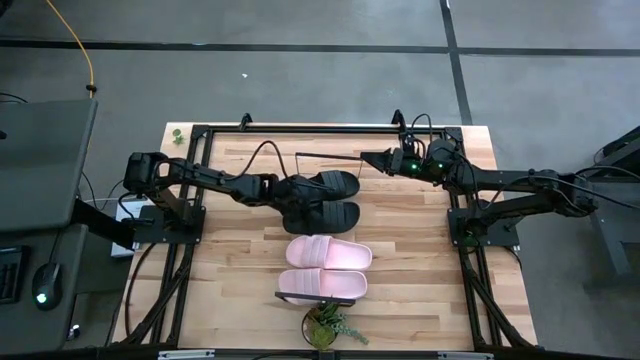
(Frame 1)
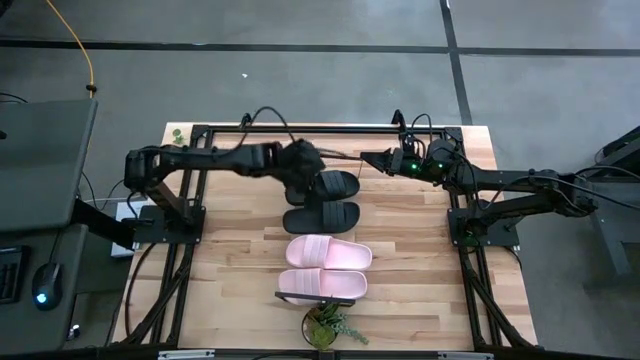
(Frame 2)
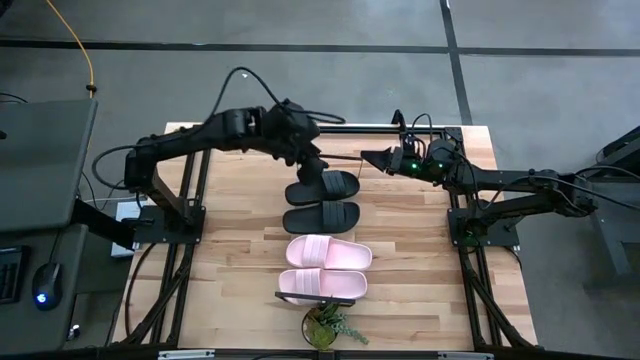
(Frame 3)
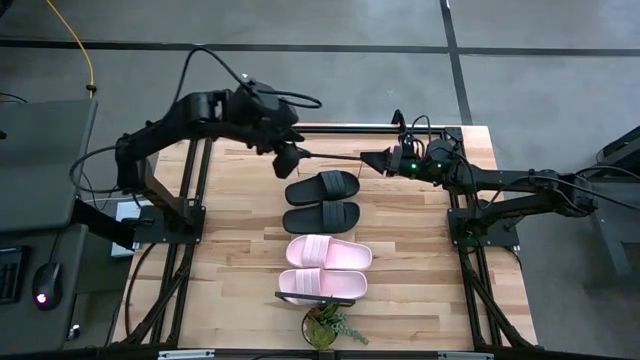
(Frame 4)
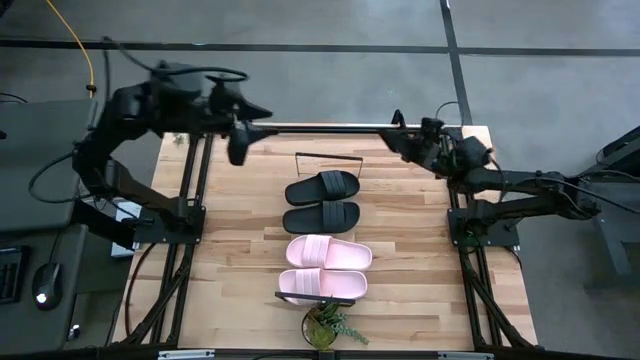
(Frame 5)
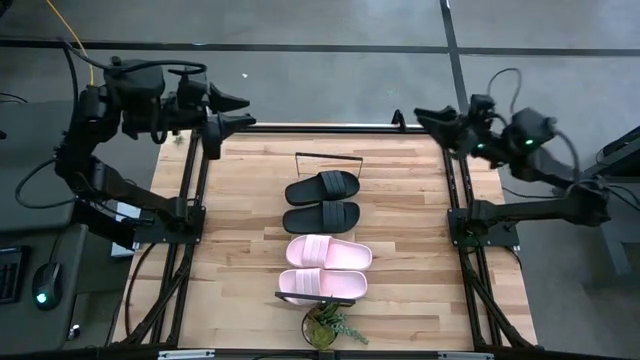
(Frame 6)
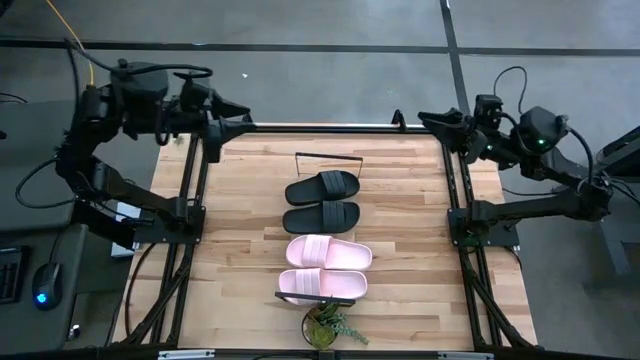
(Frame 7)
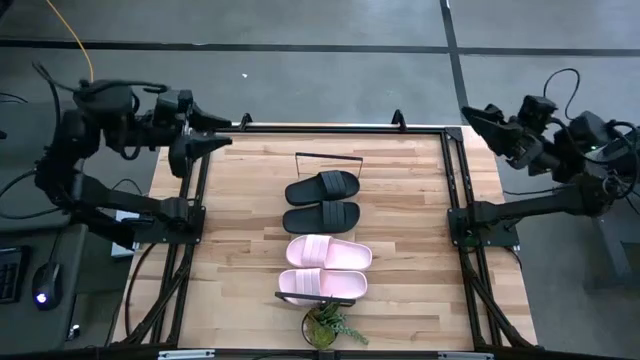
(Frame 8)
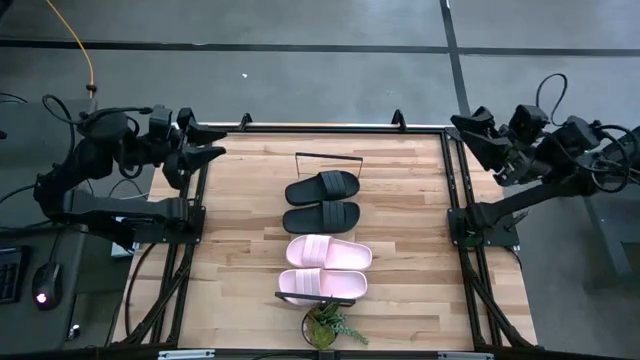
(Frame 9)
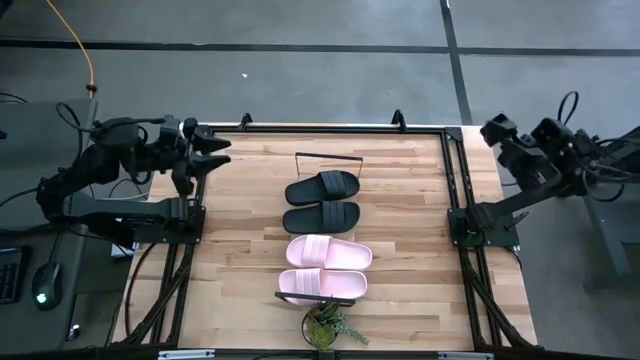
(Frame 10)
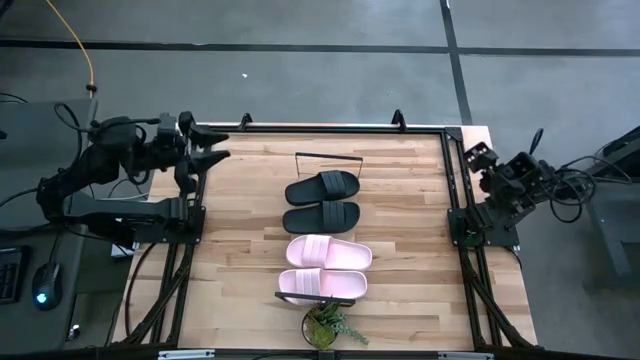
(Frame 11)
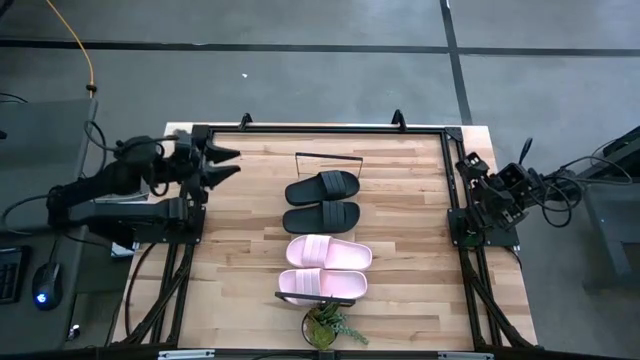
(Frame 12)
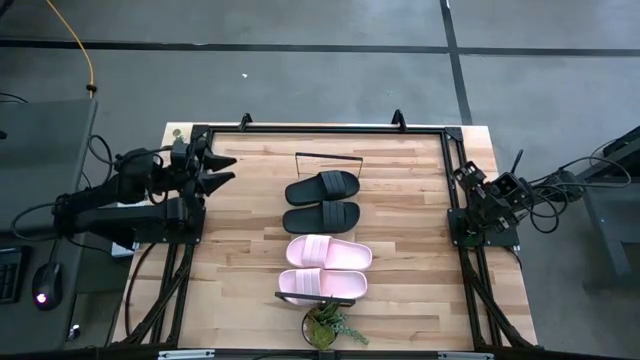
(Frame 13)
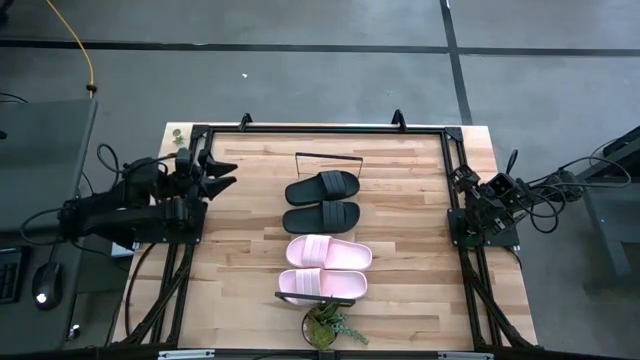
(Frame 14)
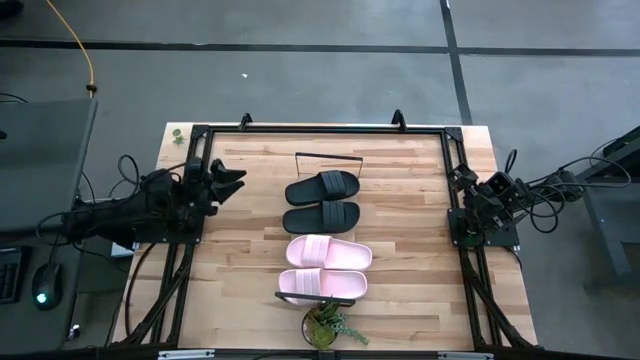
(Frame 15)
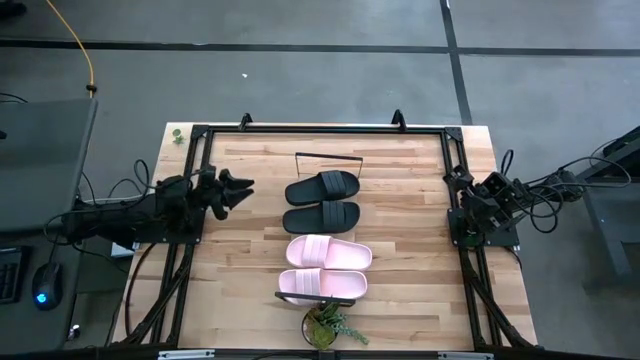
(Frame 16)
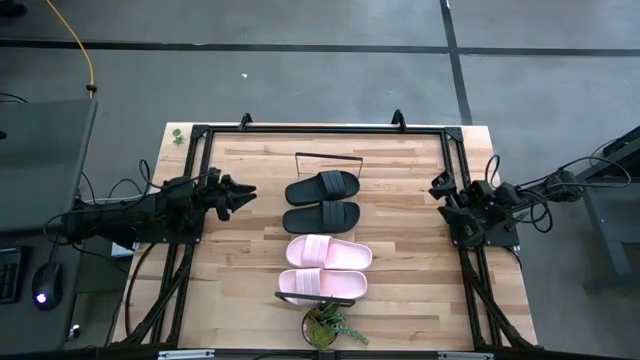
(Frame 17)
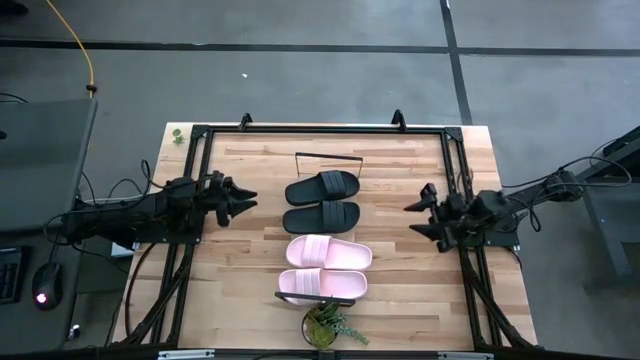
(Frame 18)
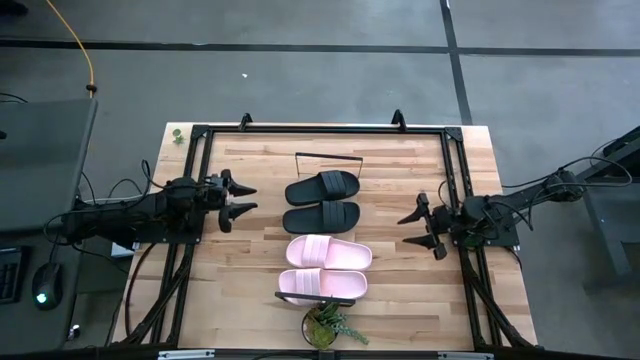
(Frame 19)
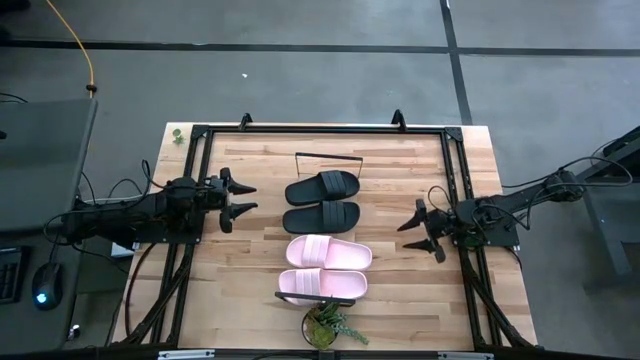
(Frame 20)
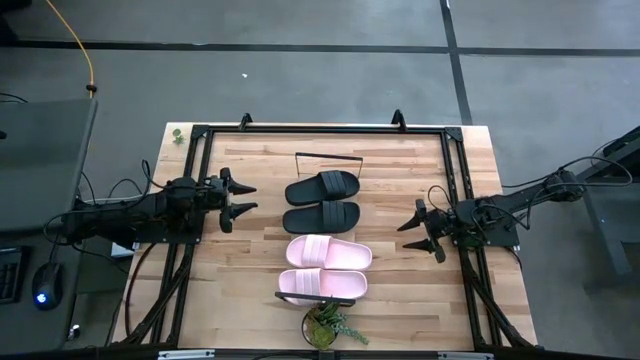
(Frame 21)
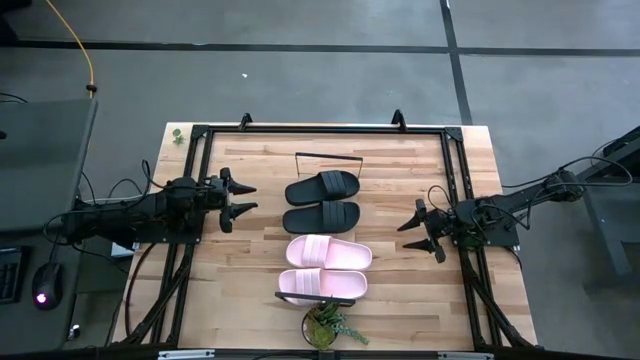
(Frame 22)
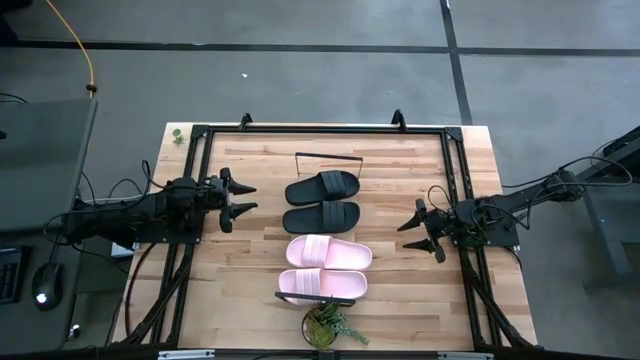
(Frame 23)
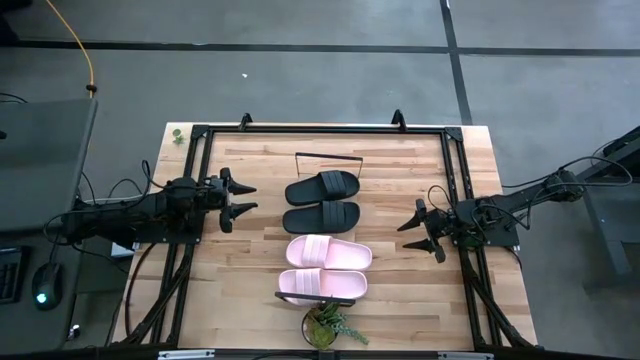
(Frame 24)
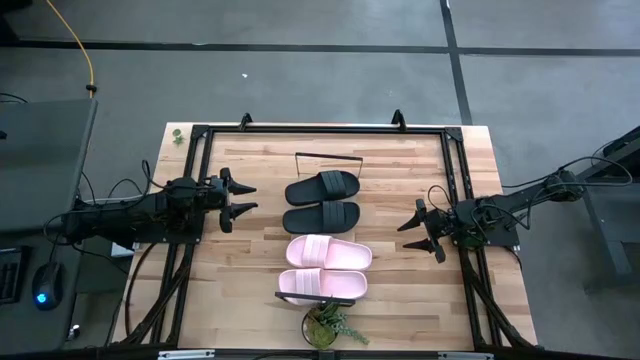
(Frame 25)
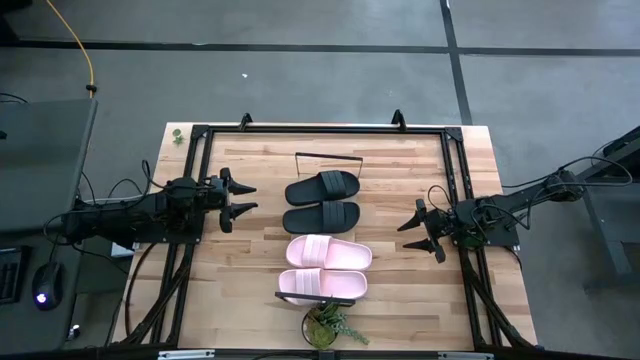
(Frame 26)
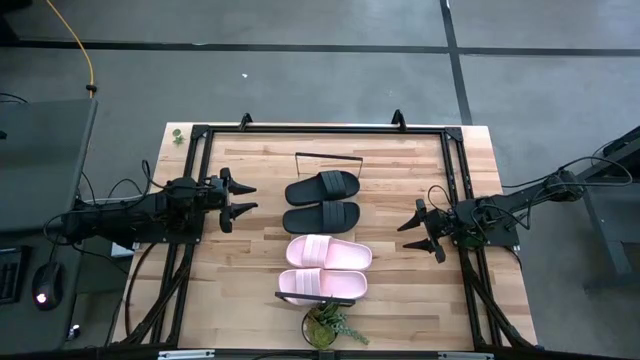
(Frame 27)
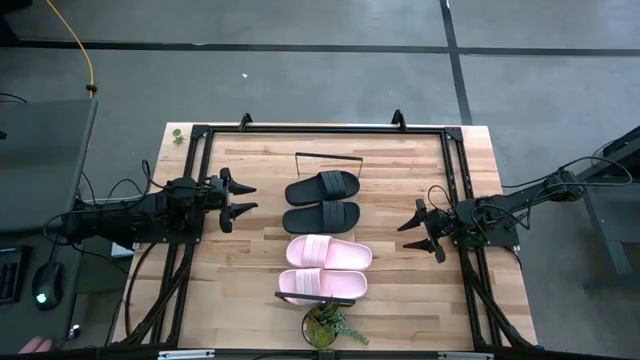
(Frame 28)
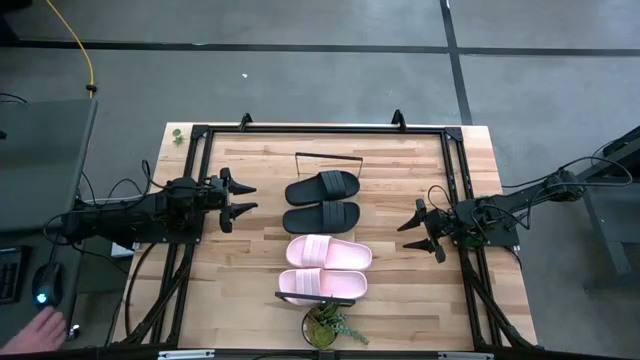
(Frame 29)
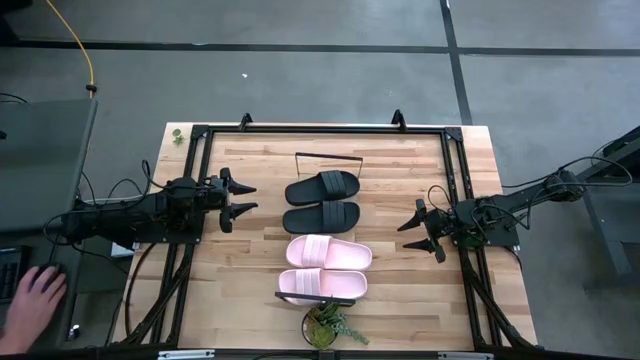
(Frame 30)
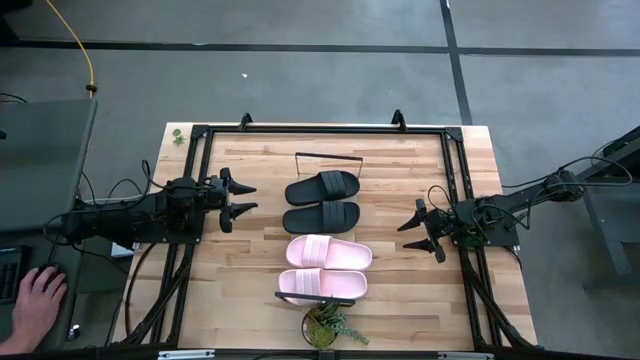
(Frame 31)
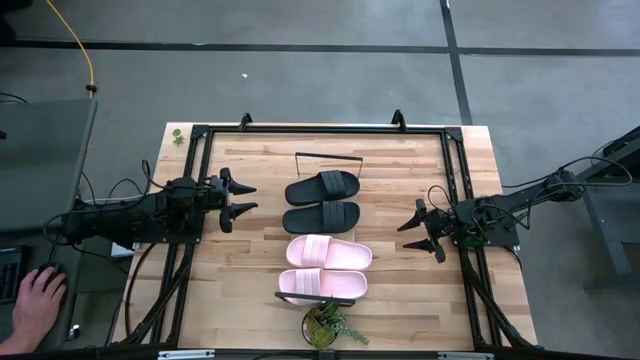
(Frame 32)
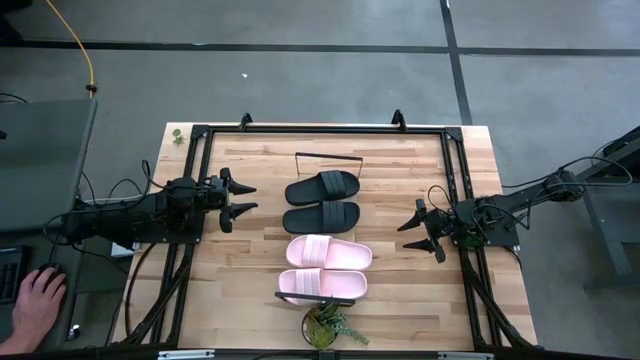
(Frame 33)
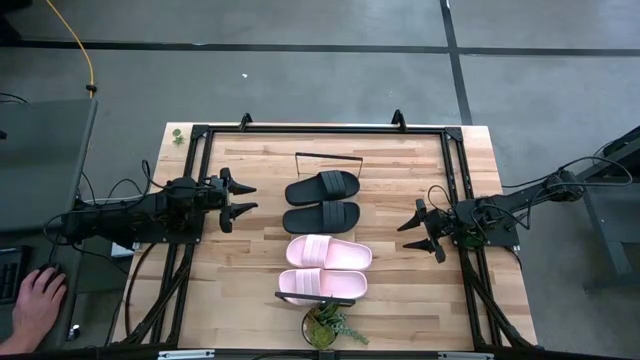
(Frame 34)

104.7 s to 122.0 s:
Task: Pick and place slides into the shelf
Return to Home Position

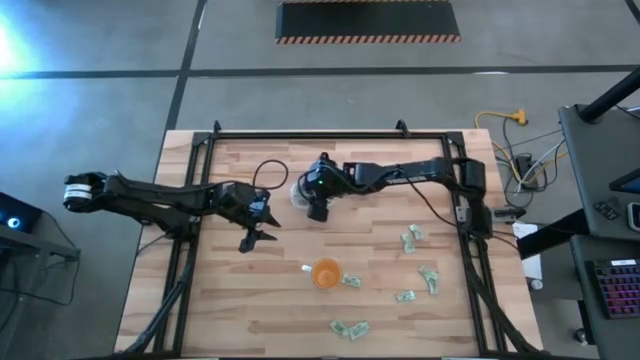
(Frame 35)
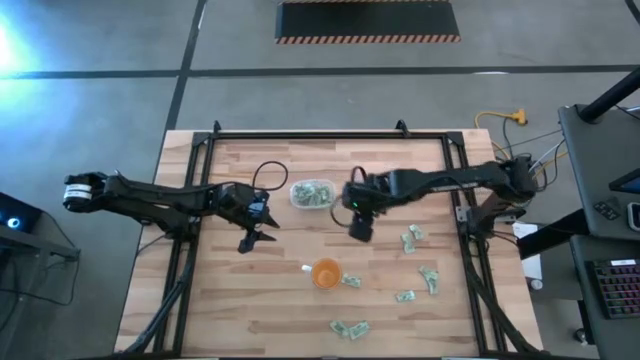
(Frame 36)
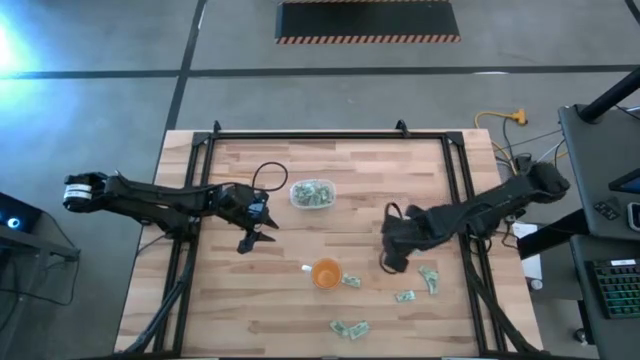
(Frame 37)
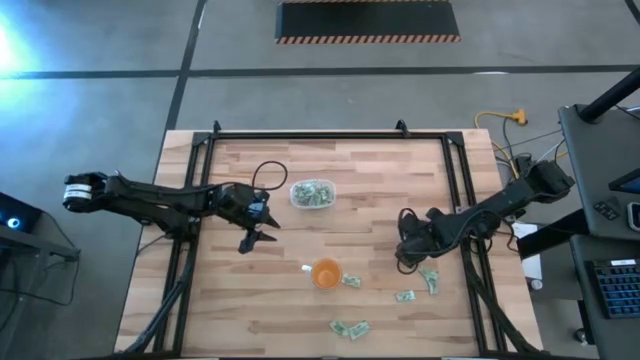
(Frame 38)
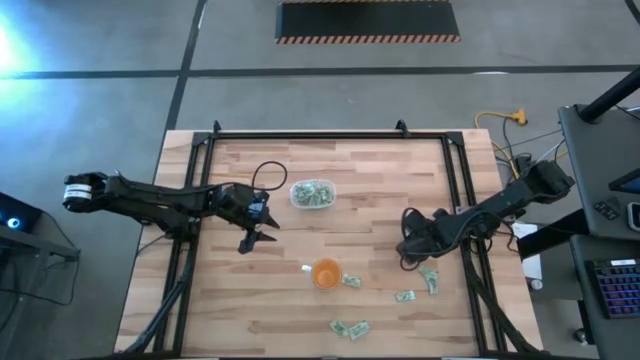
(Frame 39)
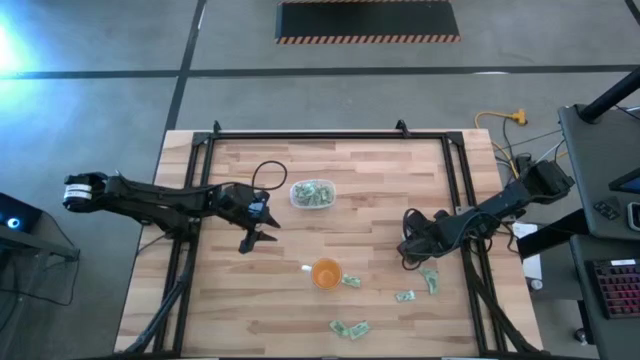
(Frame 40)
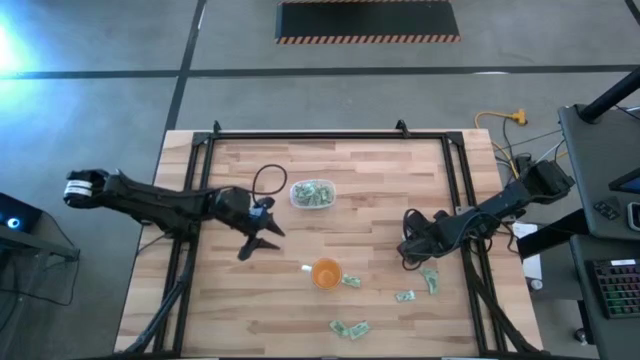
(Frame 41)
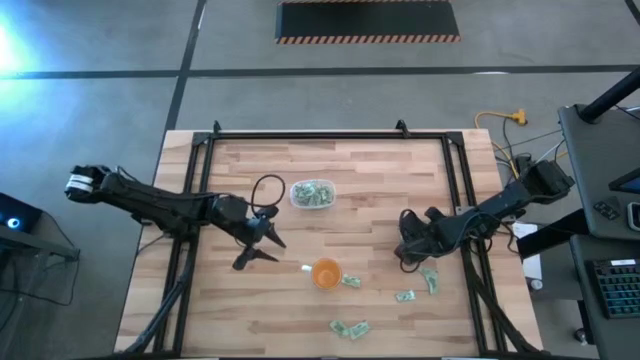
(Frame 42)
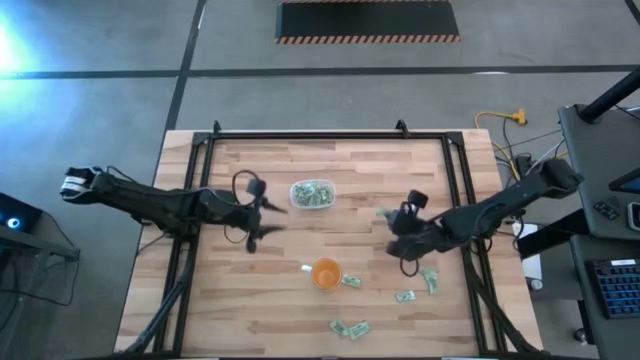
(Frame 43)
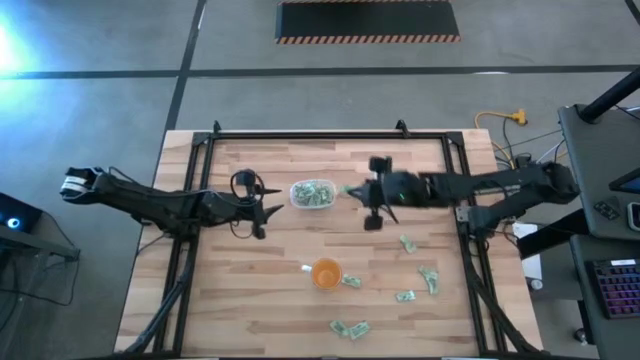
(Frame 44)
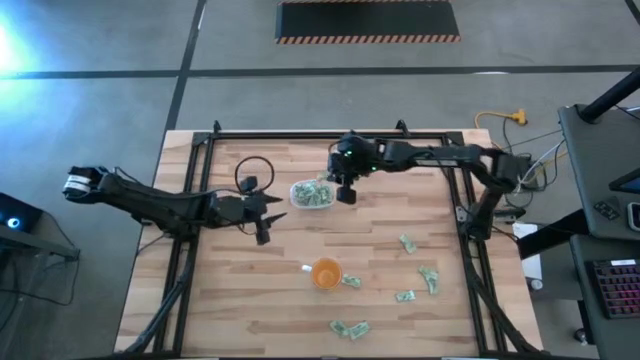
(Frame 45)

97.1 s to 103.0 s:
Task: Pick and place Stevia / Truvia into bins
Put the stevia packet into the transparent bin
